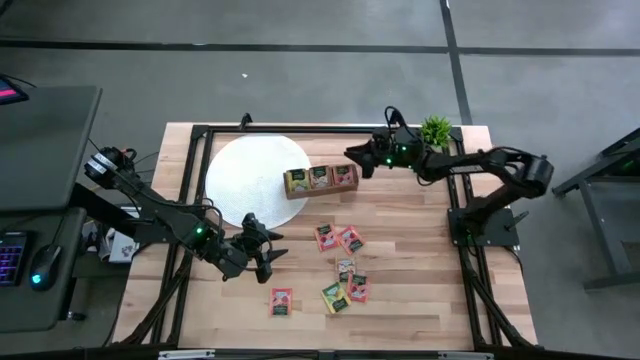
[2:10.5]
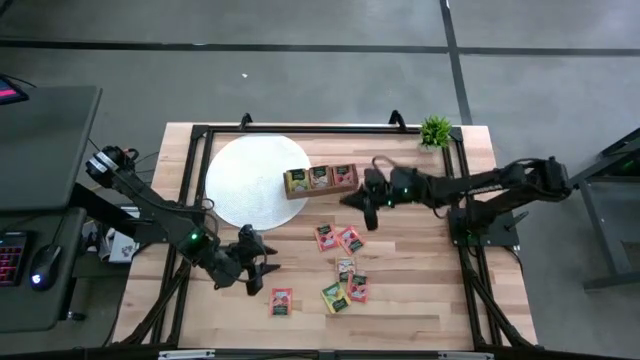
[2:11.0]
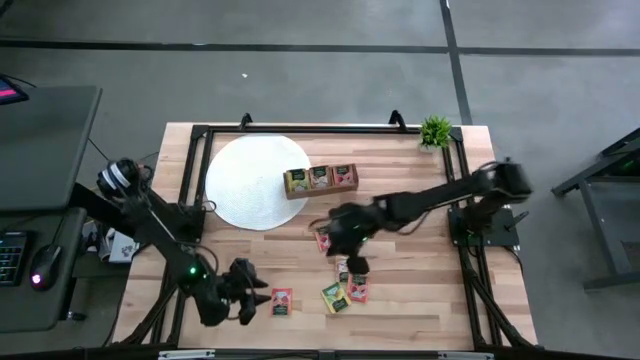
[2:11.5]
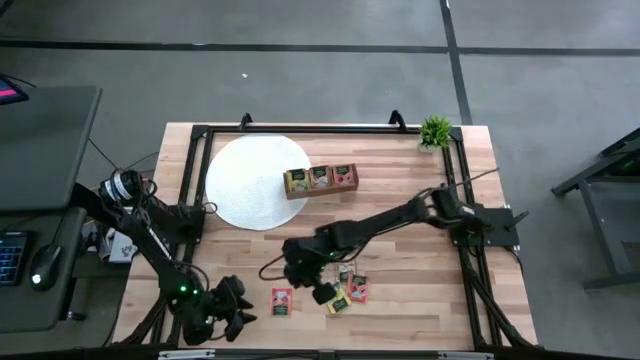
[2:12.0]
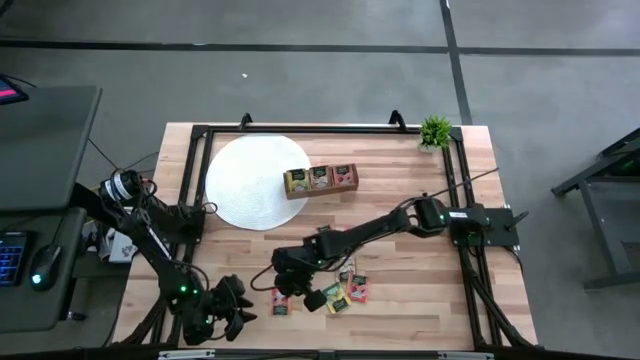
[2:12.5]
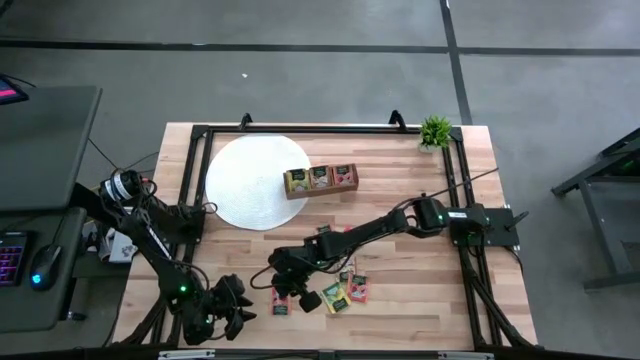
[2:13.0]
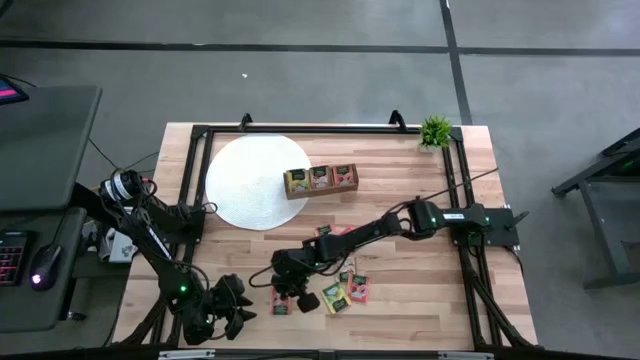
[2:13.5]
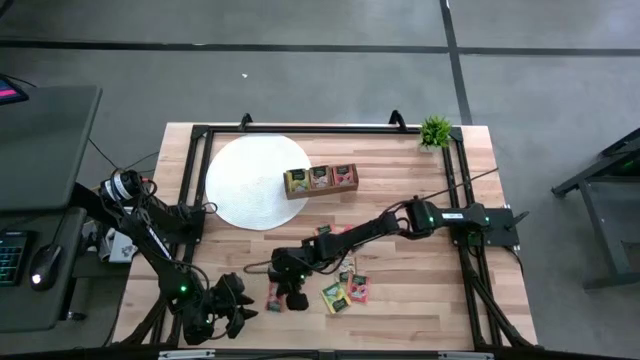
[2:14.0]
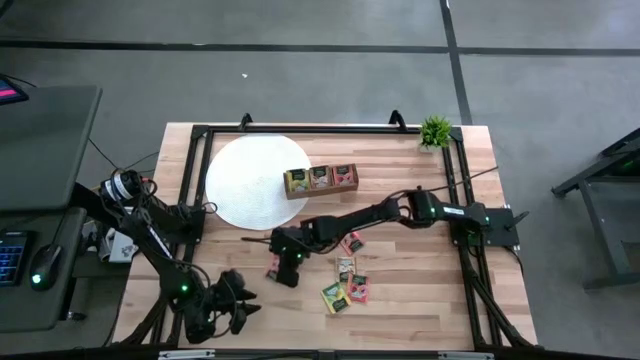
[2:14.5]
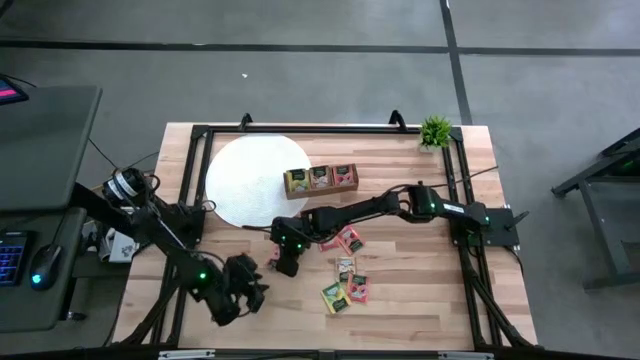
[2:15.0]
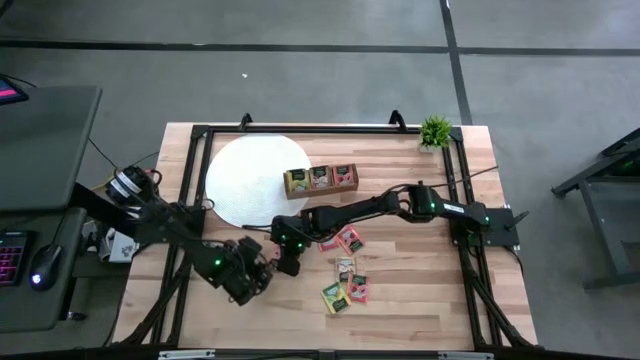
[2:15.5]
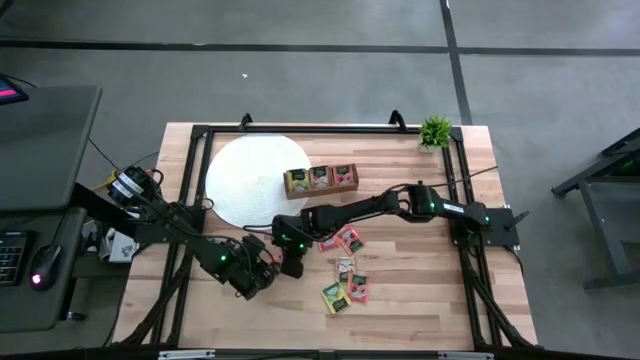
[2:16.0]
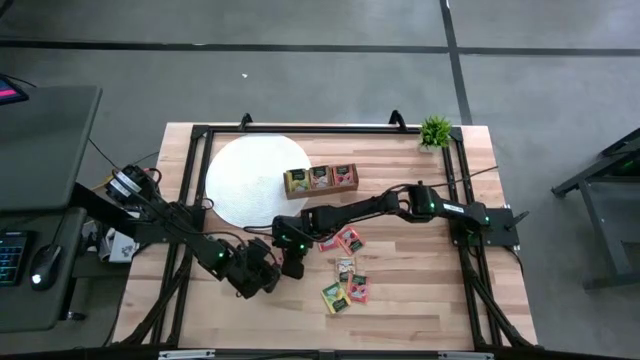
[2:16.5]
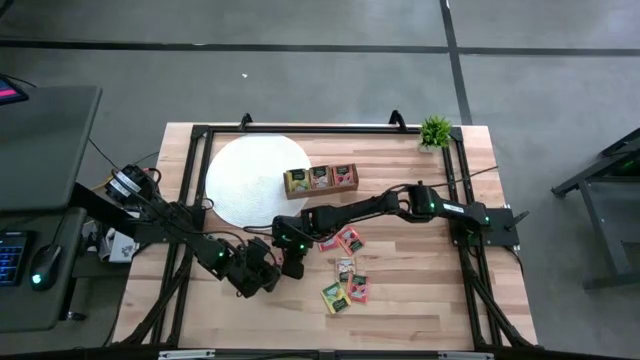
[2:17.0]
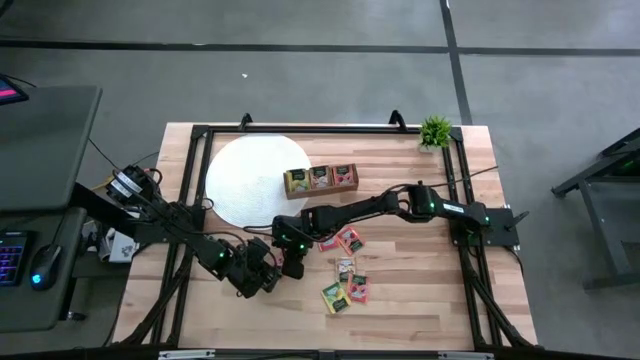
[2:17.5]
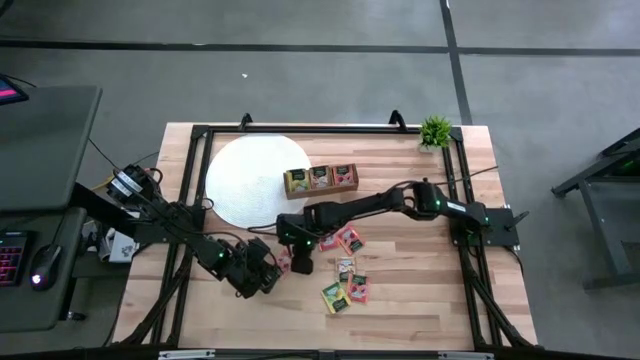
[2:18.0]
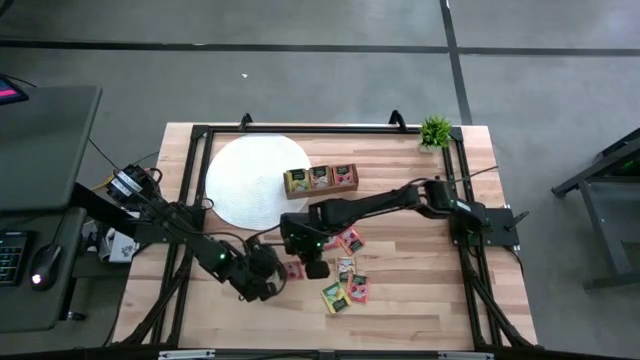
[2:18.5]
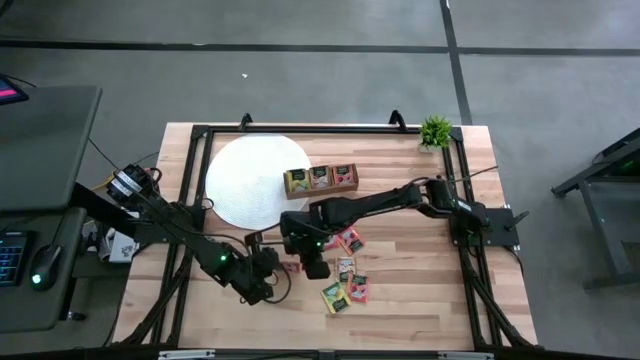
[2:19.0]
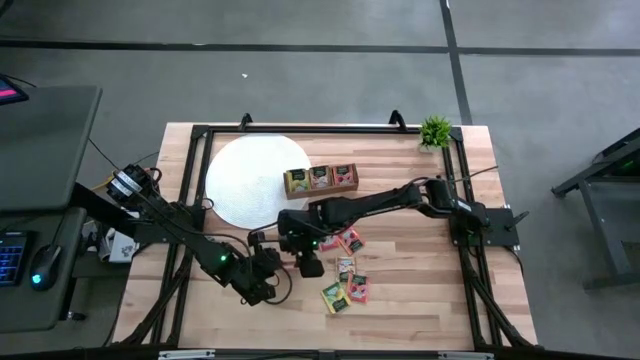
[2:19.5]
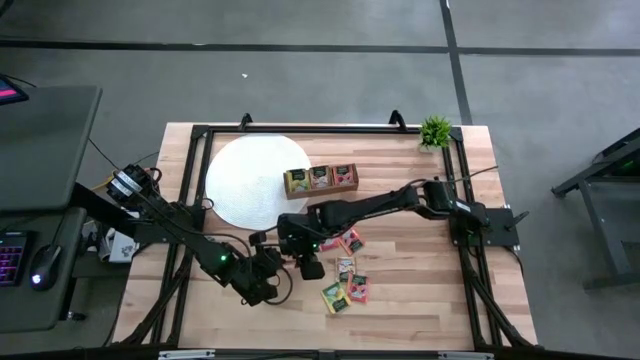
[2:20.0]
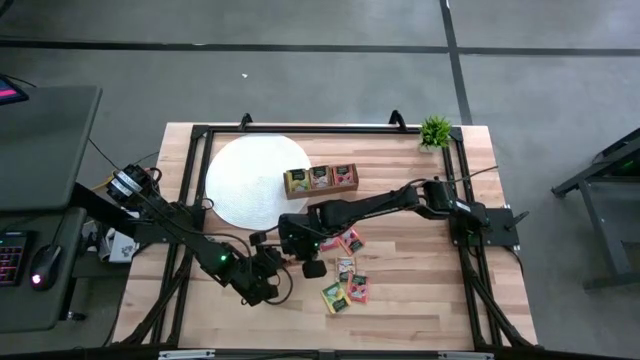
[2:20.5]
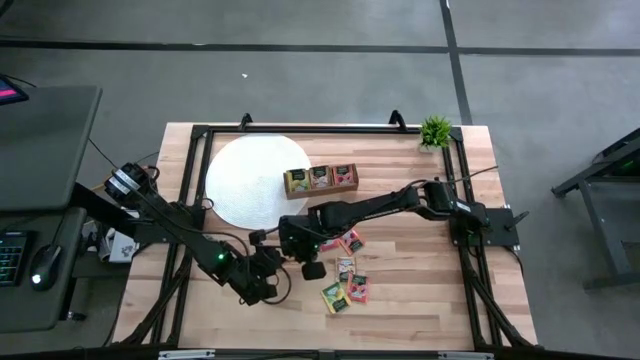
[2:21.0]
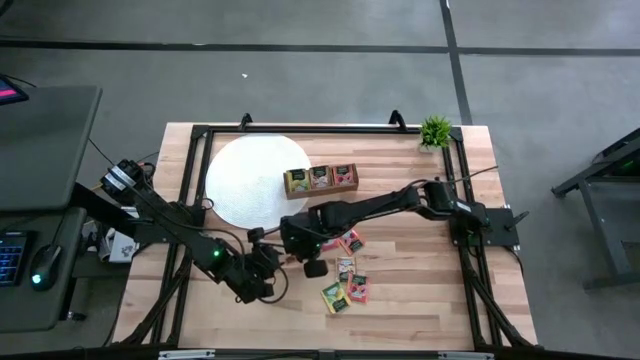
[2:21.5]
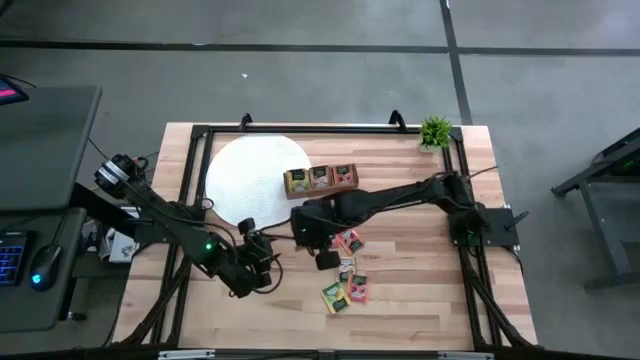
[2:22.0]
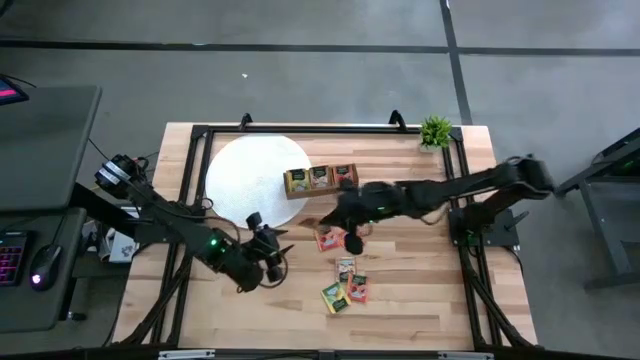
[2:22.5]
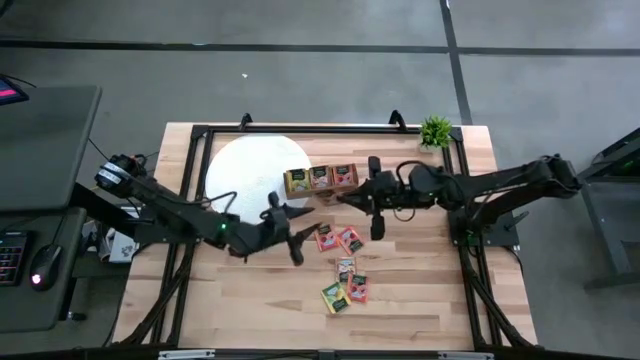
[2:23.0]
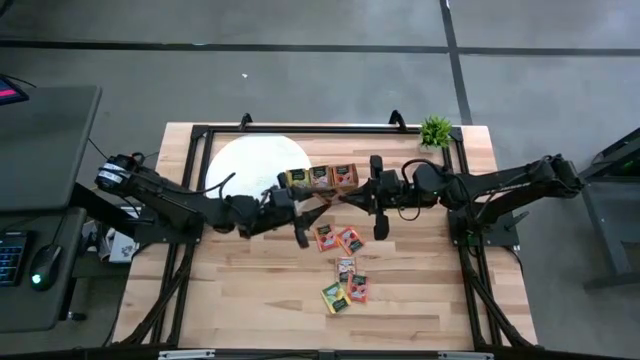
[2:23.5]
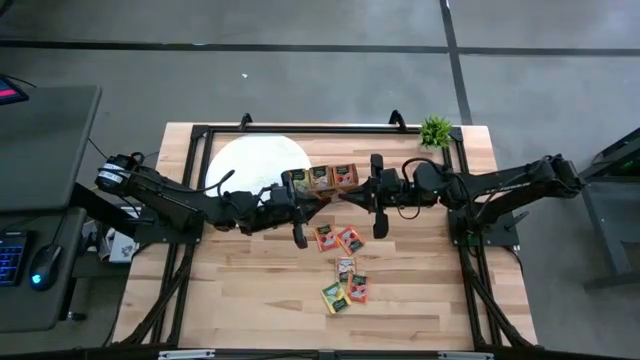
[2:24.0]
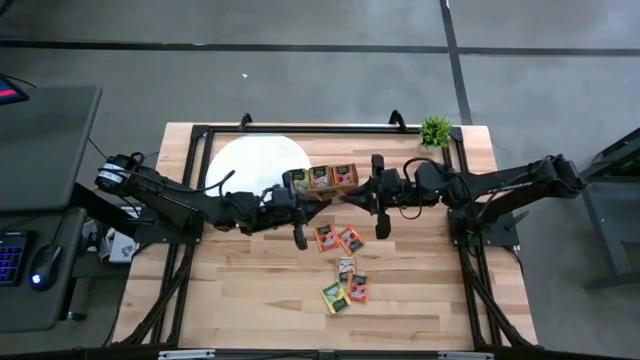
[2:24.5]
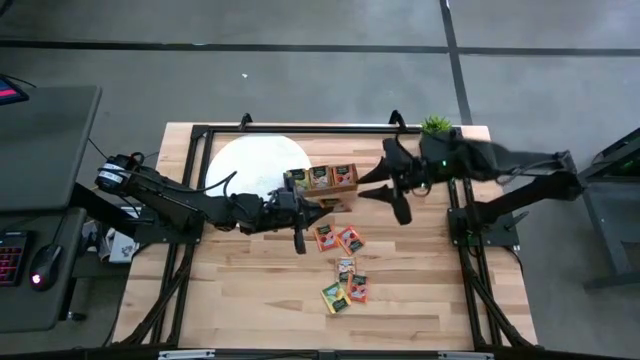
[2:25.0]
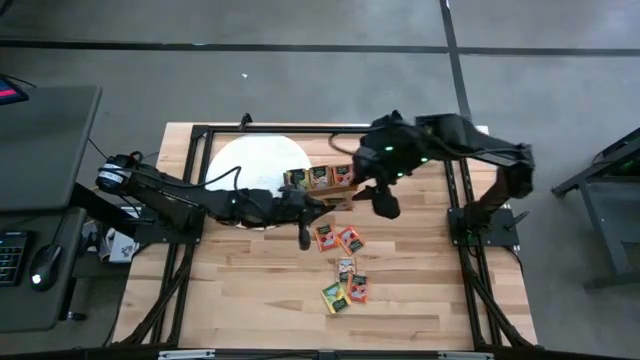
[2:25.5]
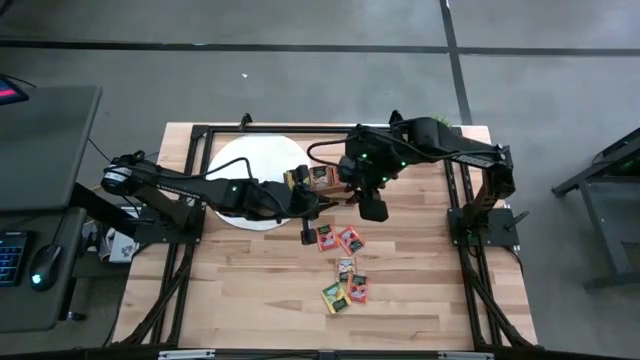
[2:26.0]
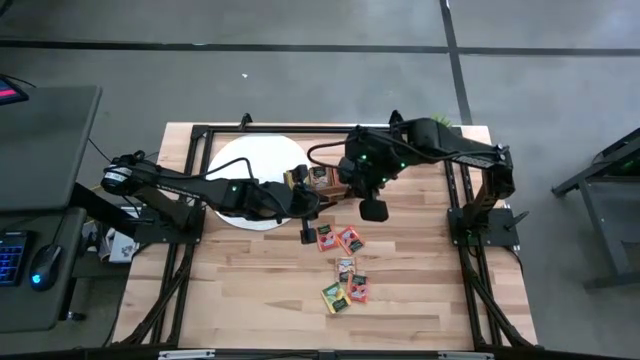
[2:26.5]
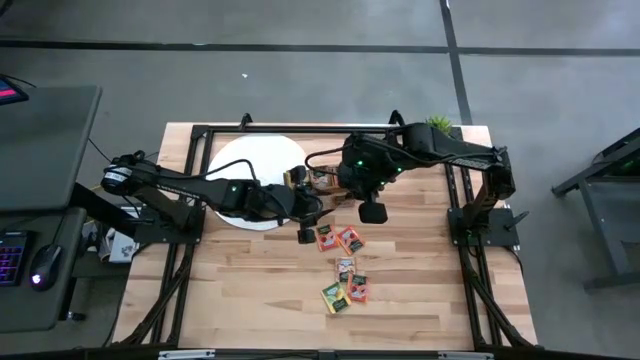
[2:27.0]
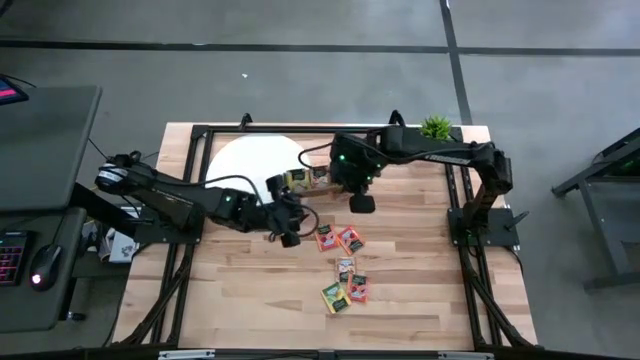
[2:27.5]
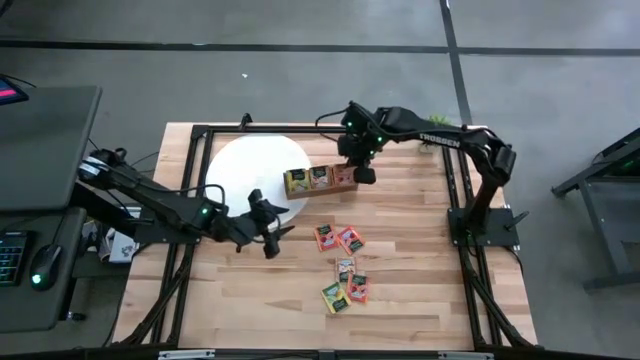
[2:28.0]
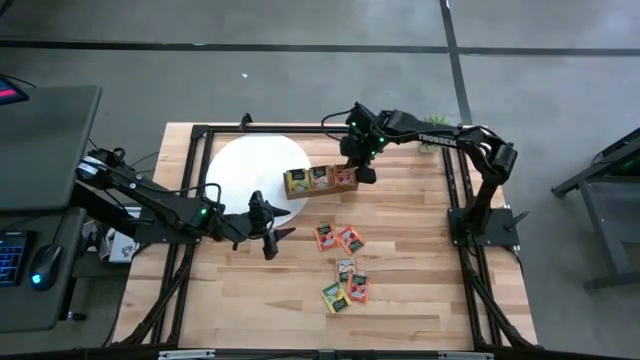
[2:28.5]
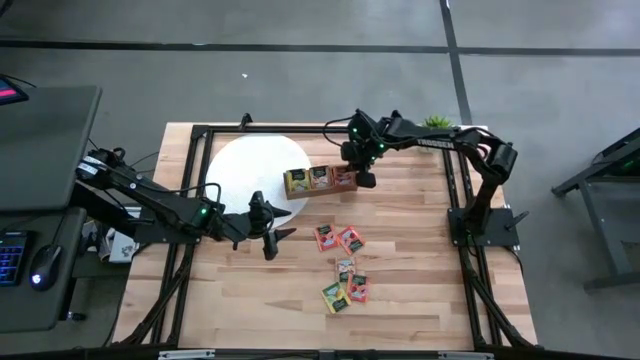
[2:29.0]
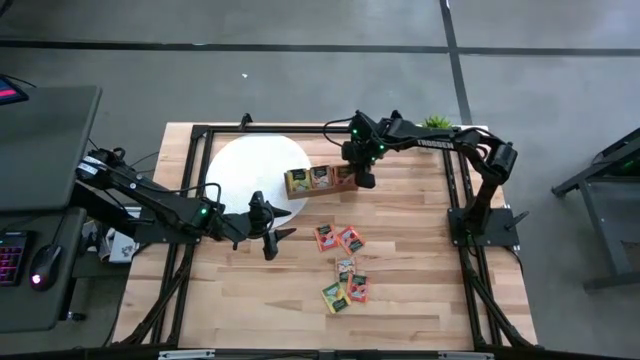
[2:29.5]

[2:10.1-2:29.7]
Task: Pick & Place Tea
Put the orange tea bag into the right compartment of the wooden organizer
